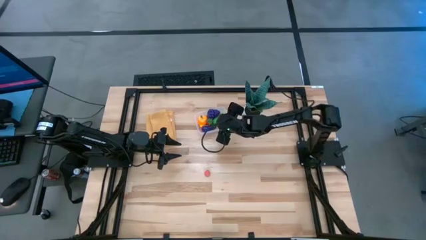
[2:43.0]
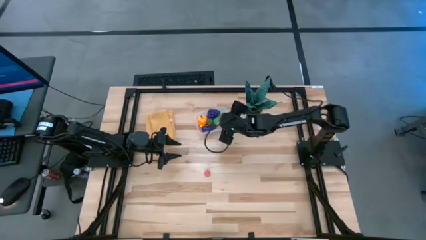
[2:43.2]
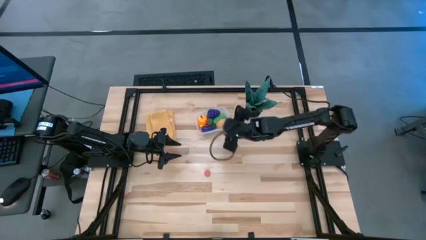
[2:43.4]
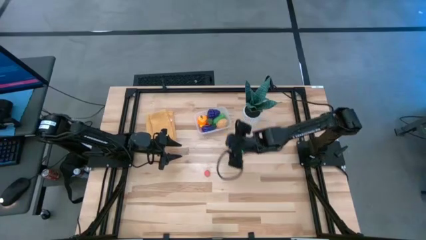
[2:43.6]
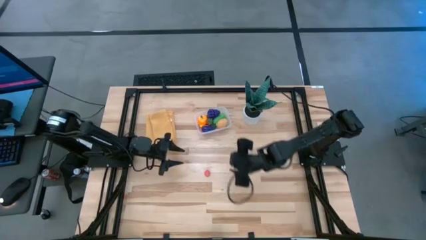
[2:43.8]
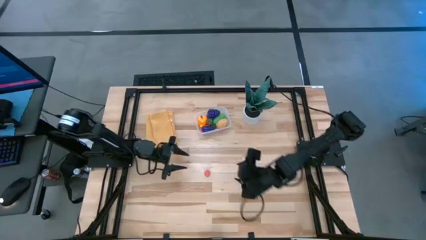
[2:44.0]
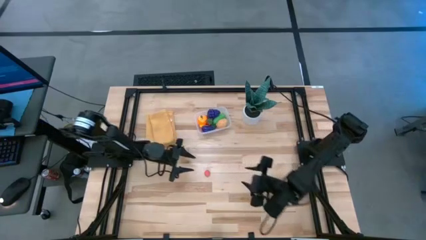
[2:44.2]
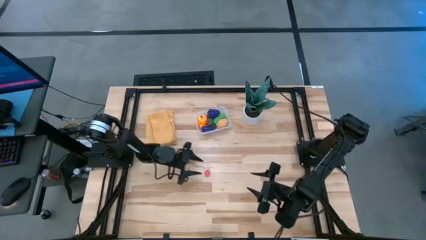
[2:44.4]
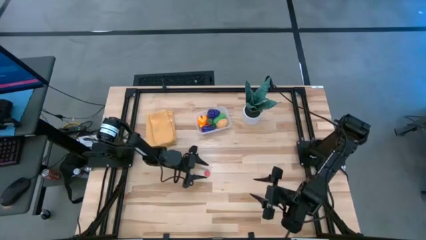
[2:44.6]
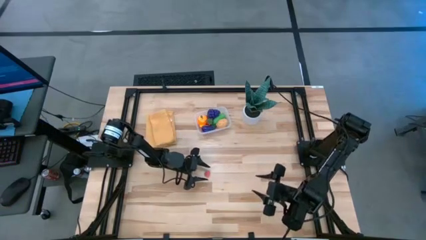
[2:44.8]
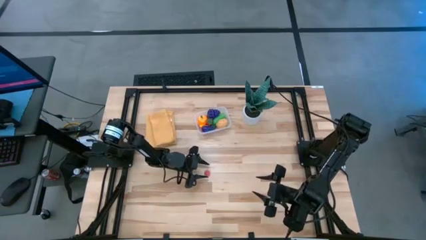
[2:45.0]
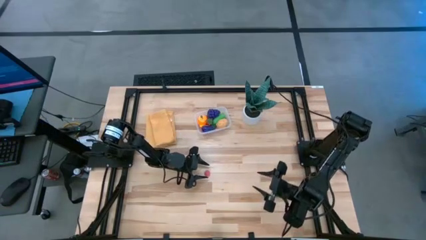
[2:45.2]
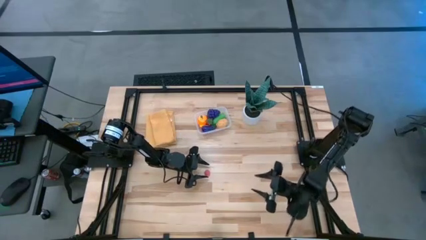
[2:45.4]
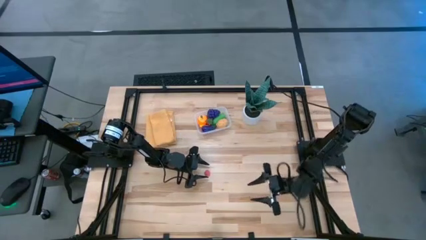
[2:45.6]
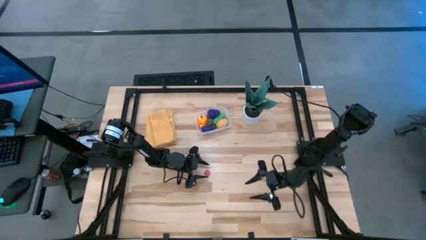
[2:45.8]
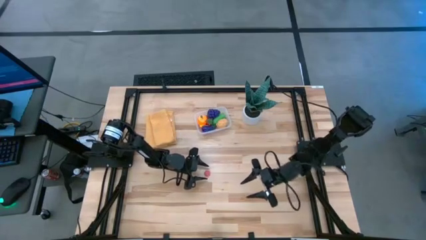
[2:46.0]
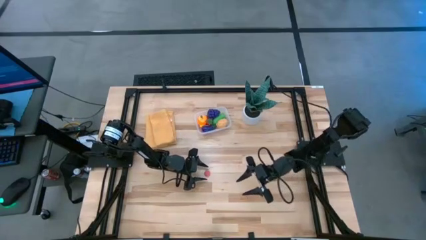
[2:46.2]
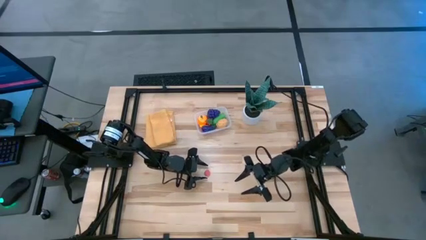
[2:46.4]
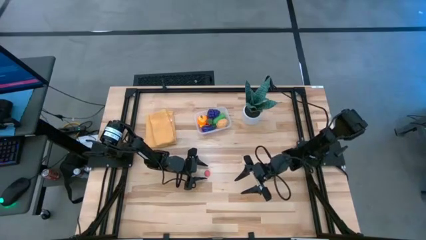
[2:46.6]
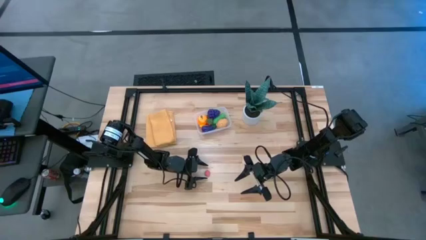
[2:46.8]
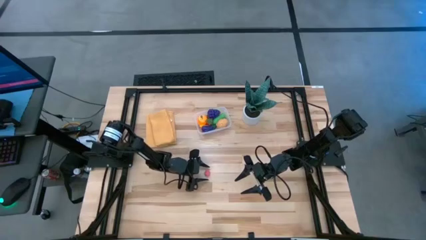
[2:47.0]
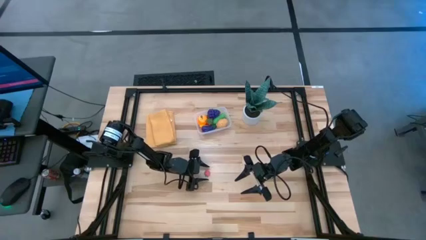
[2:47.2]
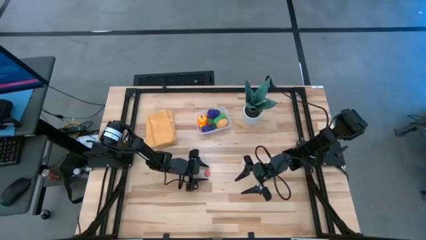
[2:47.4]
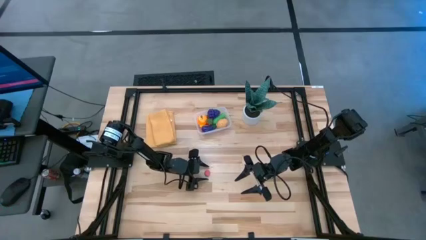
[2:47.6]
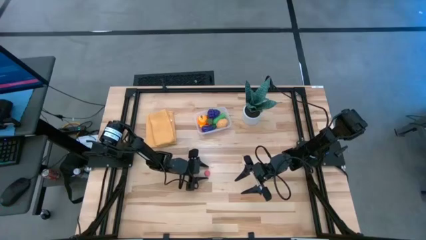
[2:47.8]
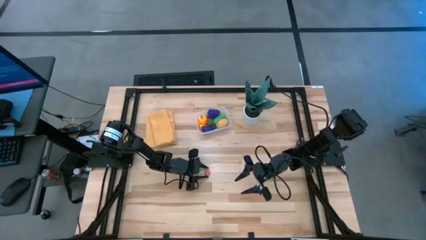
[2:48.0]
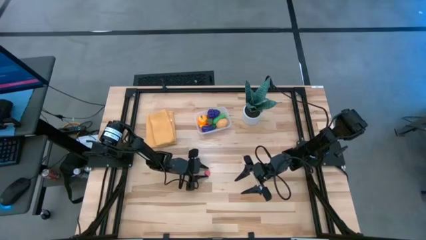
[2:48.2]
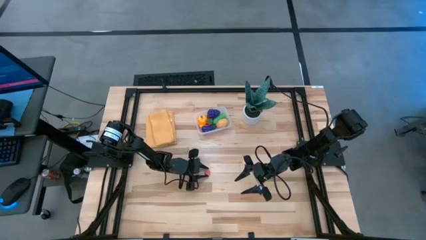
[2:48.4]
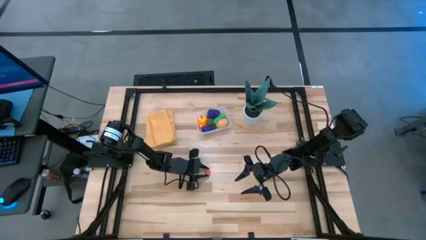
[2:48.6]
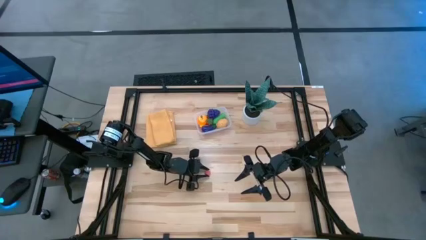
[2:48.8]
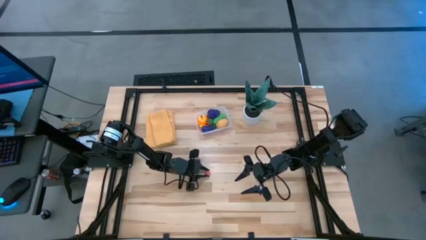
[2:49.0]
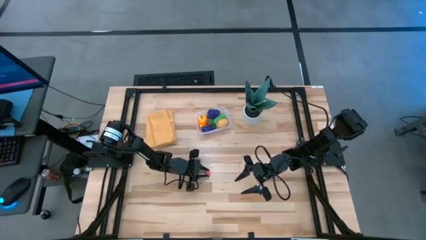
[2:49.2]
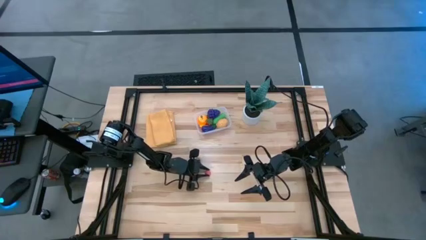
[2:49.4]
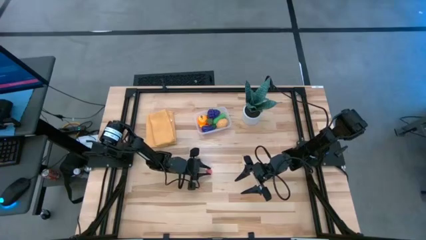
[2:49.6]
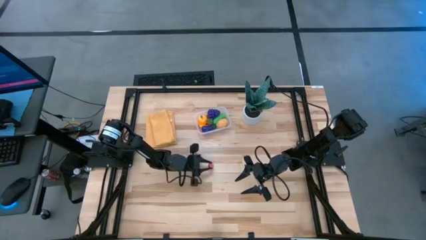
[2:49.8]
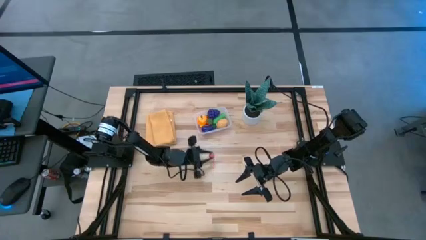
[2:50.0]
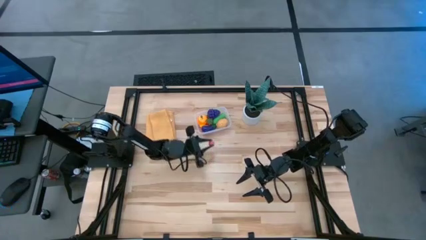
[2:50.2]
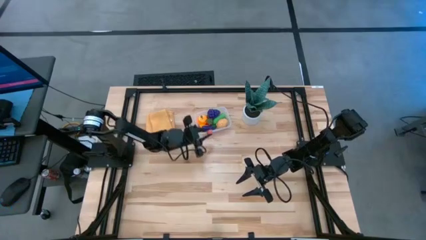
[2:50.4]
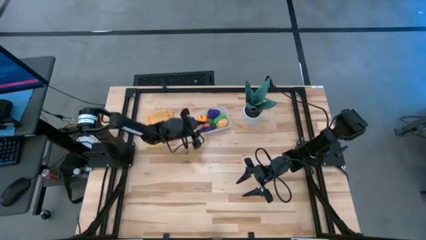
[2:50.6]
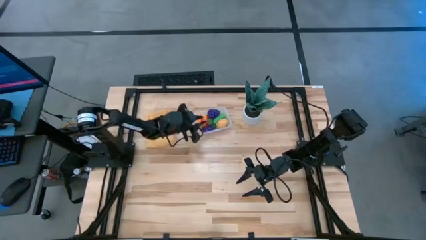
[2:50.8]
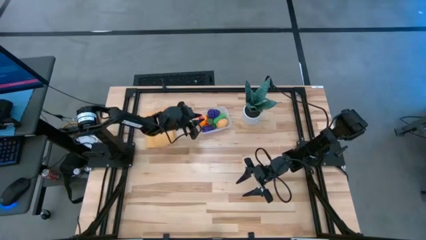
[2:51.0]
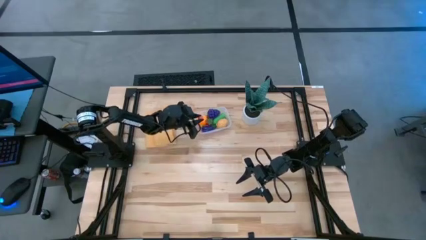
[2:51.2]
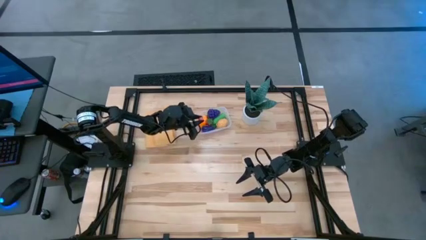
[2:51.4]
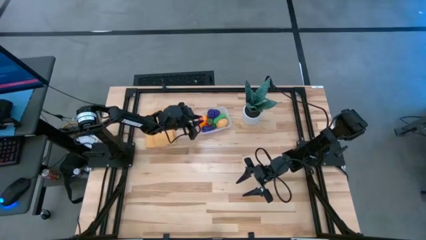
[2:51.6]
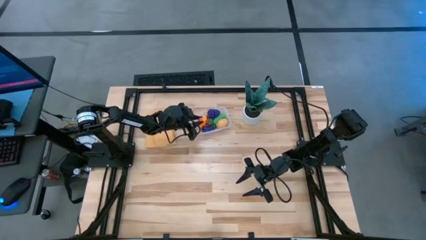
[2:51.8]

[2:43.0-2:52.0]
Task: Pick and placing Produce into tupperware
Put the peach into the transparent bin

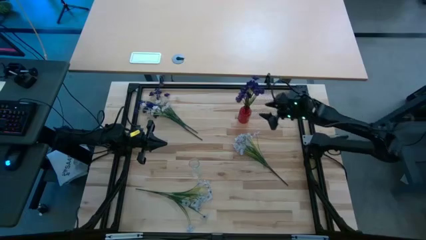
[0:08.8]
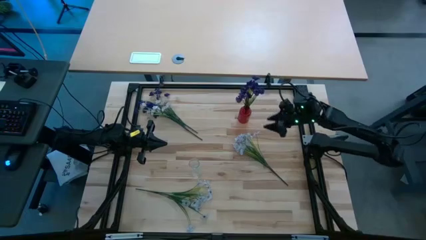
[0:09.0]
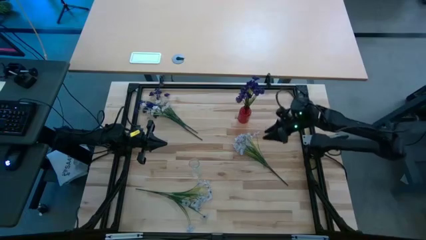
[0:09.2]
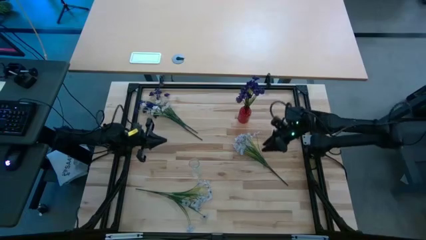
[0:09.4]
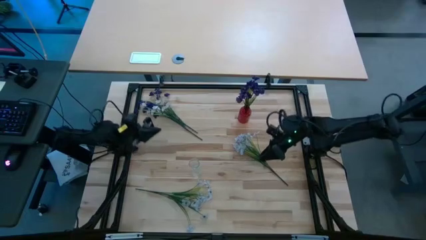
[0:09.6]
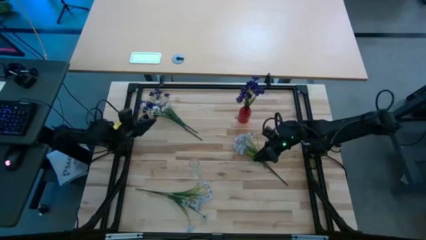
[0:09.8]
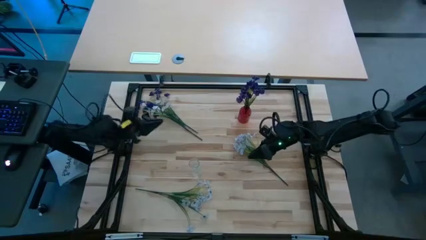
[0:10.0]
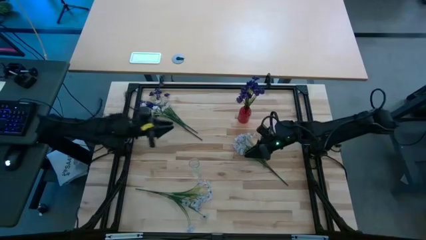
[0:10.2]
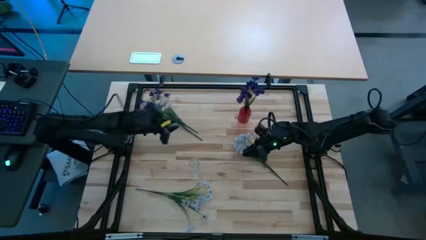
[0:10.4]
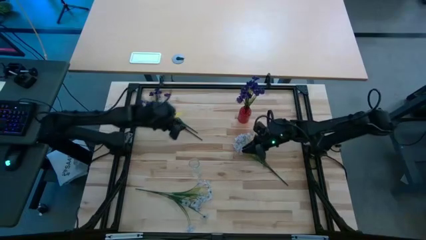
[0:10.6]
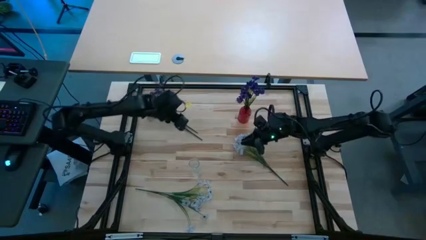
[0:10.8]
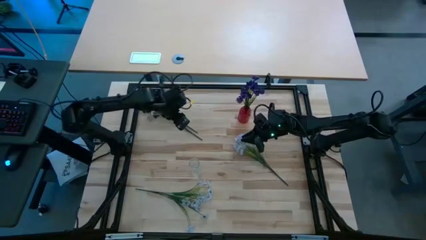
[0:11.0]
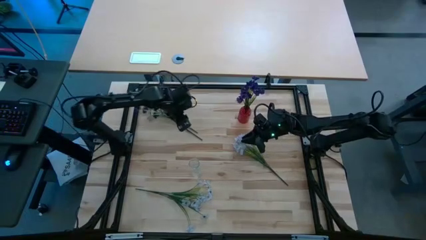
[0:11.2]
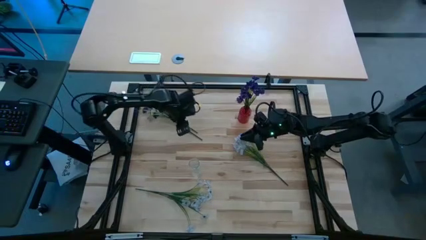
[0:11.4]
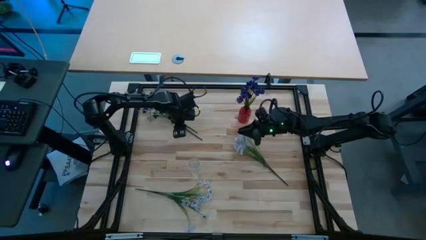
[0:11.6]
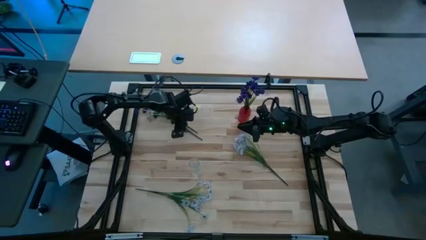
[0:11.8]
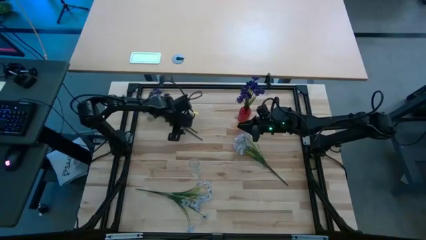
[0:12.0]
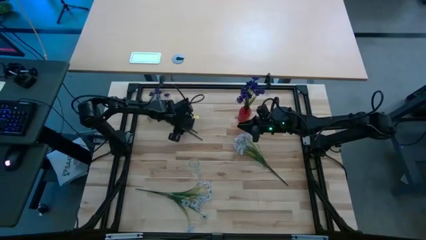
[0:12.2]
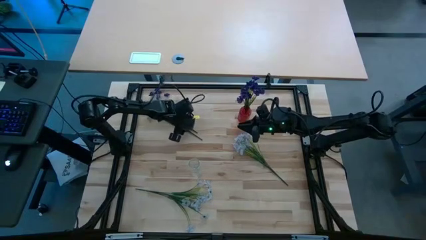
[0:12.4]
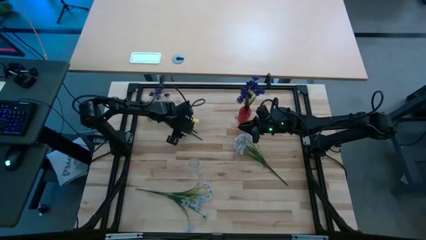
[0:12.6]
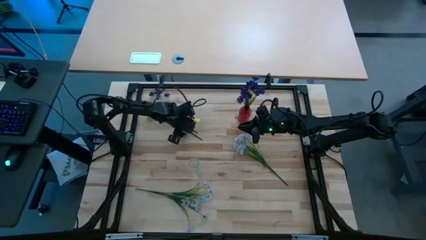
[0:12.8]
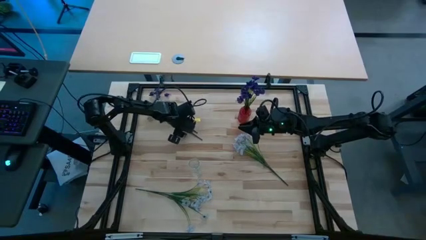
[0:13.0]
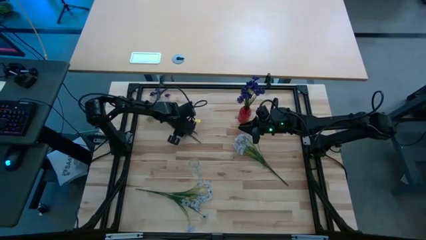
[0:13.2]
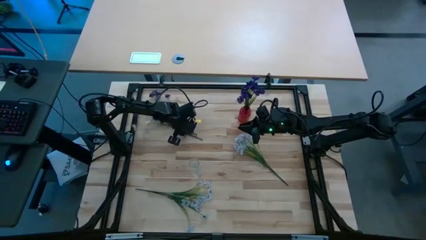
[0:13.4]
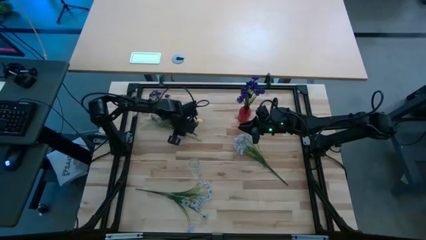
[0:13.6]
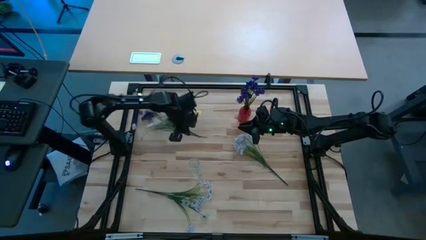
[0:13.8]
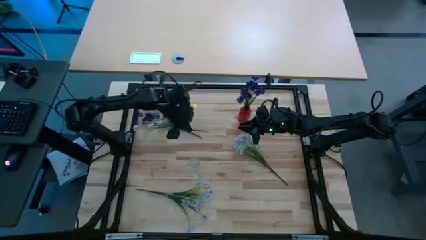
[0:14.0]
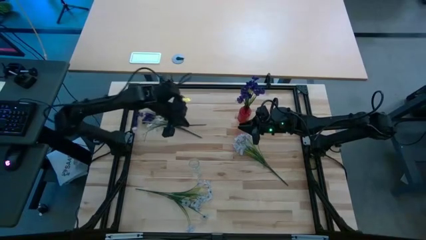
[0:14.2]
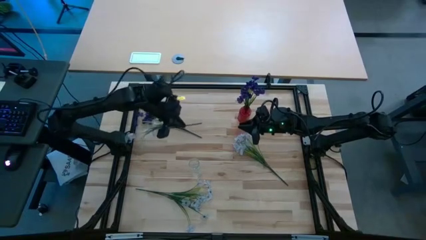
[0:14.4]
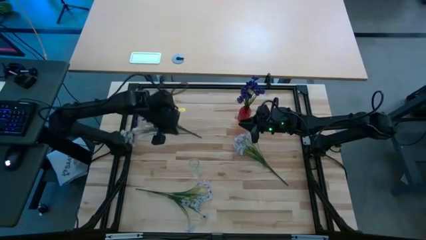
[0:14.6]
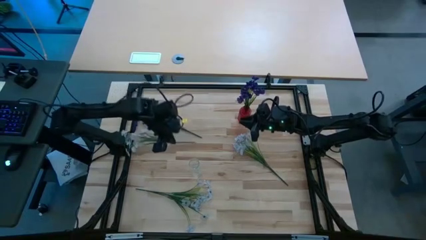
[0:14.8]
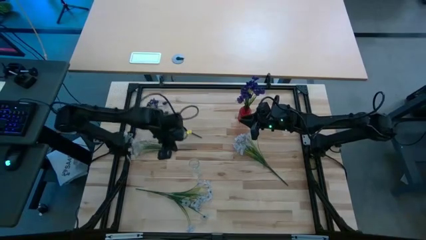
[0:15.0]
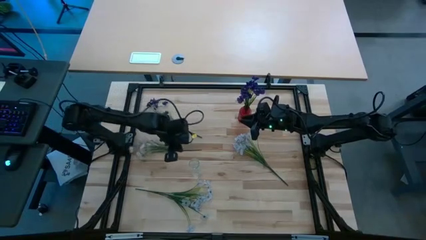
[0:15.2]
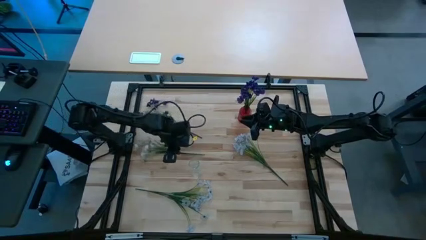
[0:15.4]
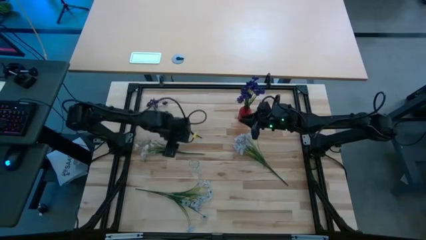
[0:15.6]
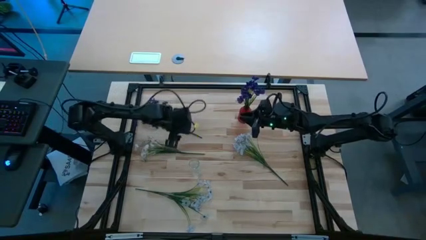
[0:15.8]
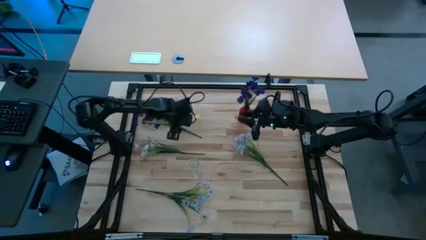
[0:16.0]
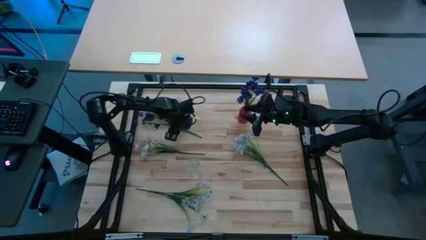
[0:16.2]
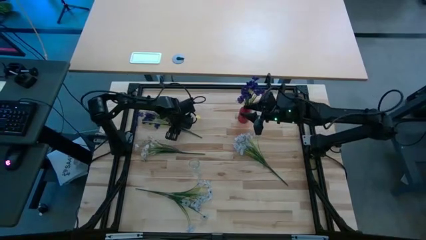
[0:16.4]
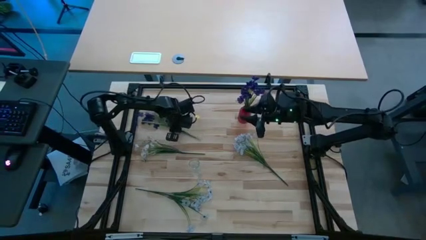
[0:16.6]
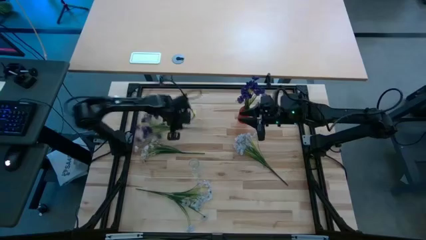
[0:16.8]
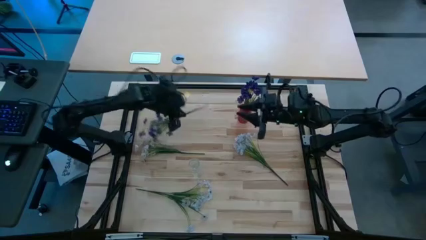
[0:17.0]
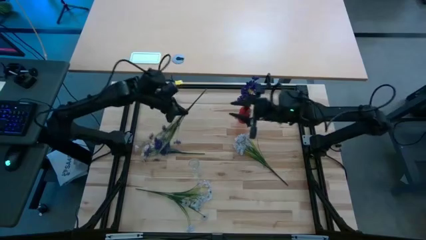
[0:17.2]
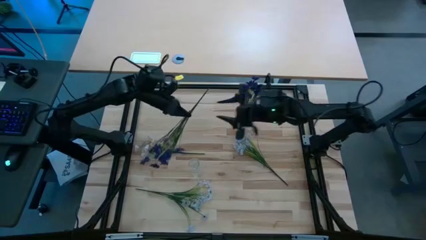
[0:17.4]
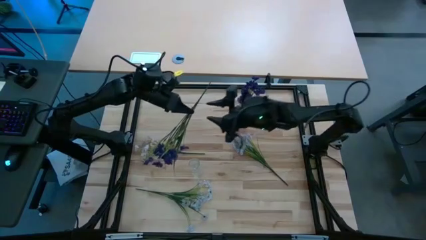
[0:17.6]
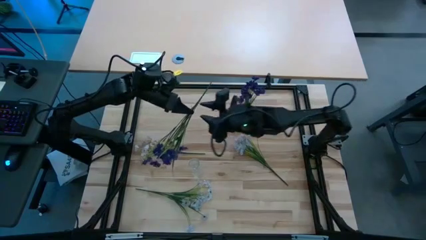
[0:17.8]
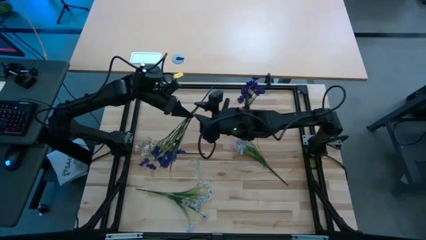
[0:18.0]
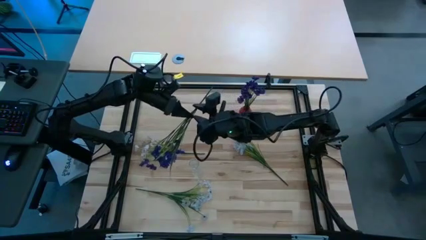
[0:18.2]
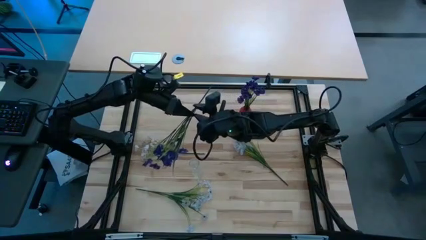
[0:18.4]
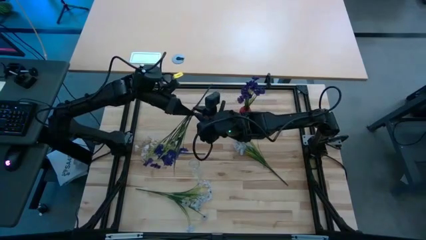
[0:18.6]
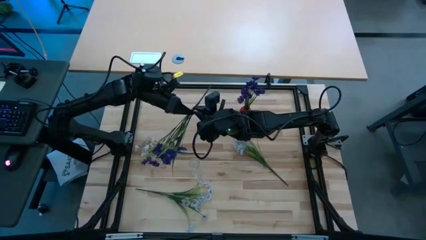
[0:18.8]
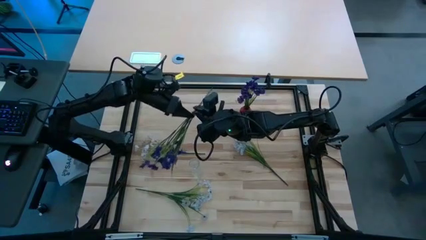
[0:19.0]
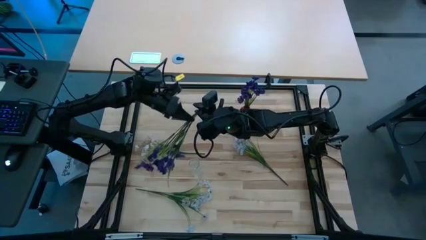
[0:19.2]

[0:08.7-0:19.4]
Task: Sort flowers into vase by color
Put the violet flowers into the red vase
